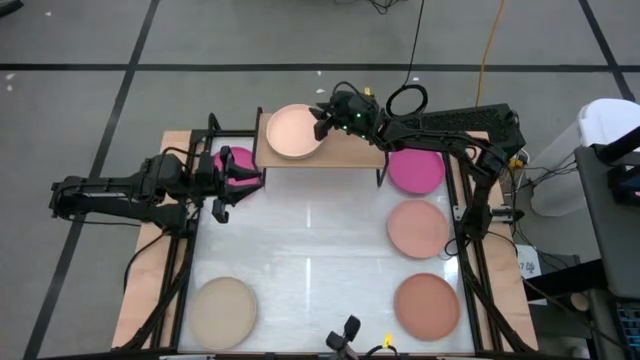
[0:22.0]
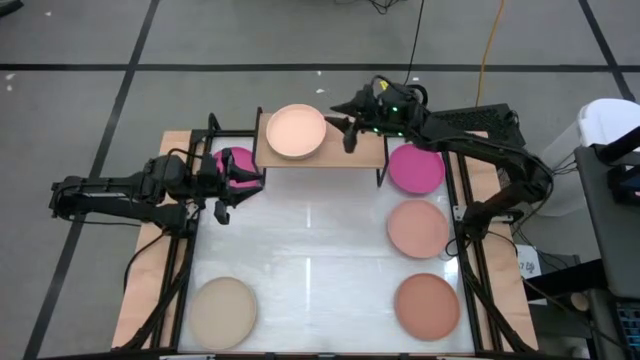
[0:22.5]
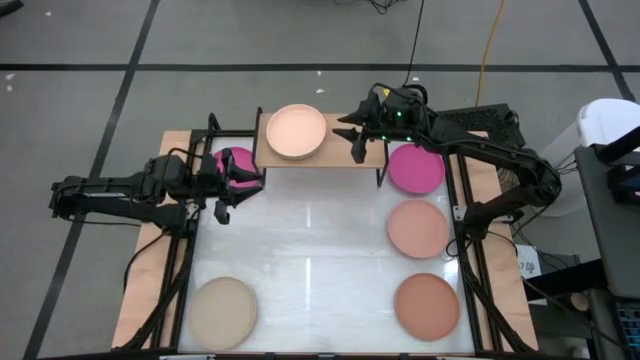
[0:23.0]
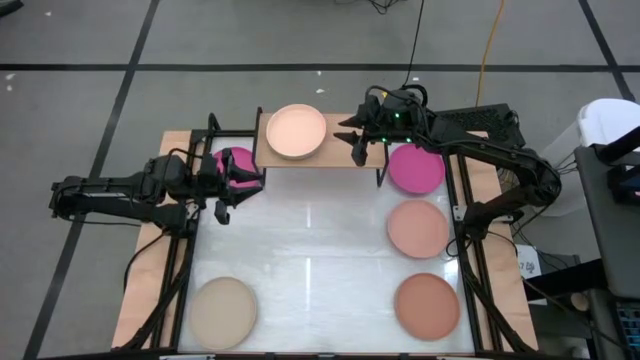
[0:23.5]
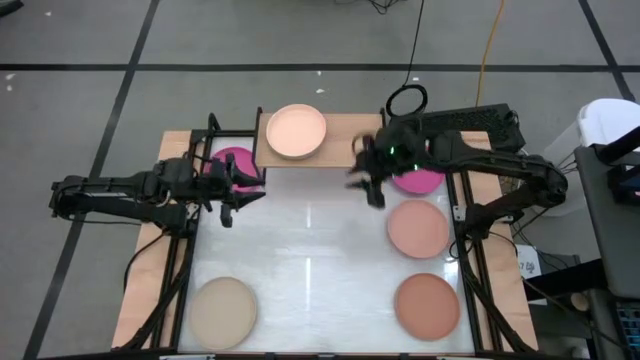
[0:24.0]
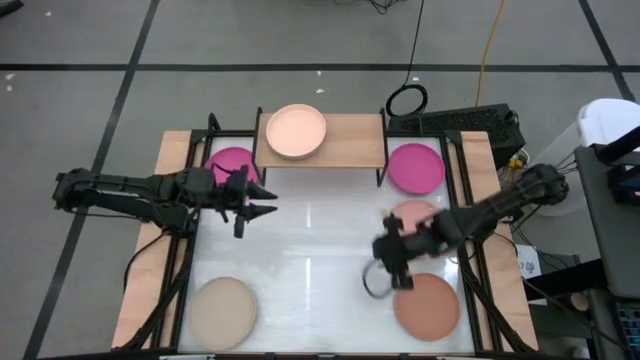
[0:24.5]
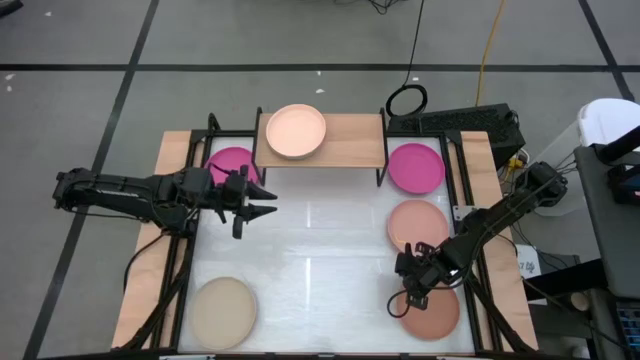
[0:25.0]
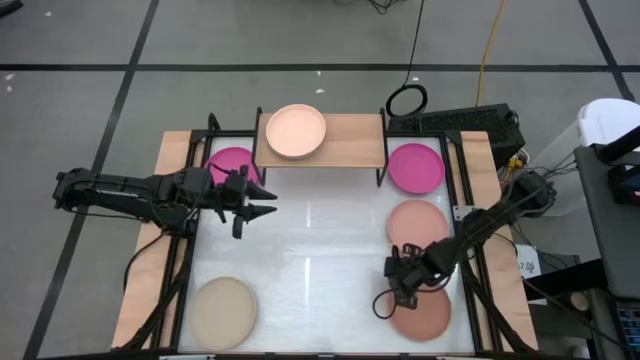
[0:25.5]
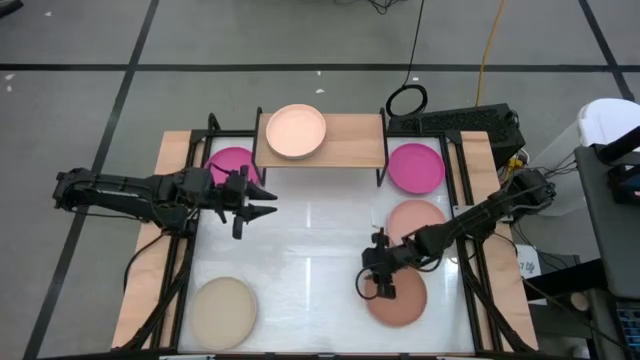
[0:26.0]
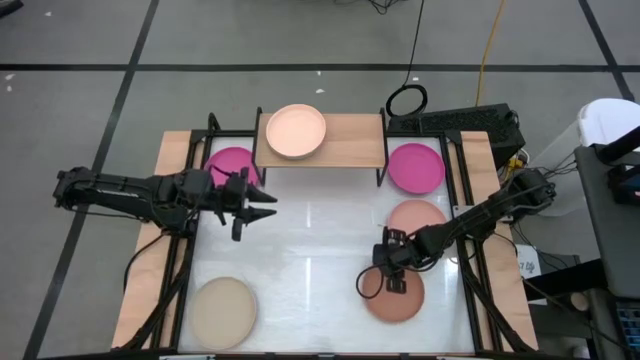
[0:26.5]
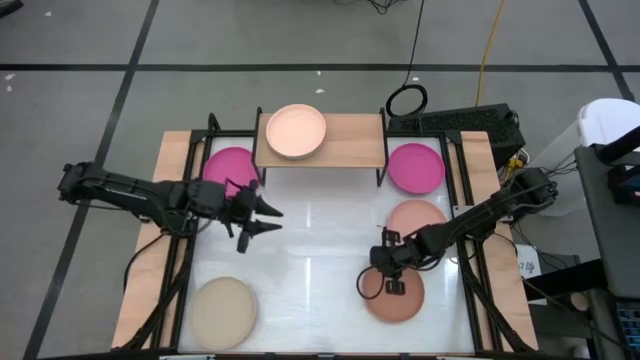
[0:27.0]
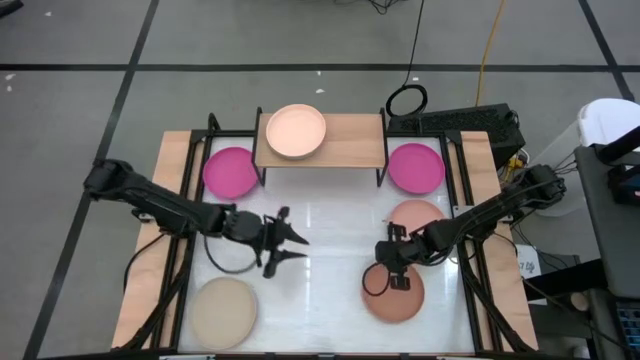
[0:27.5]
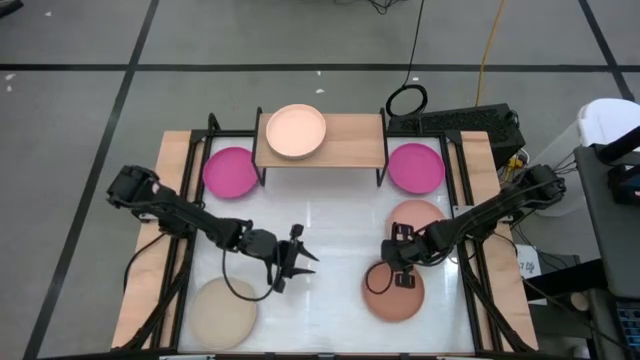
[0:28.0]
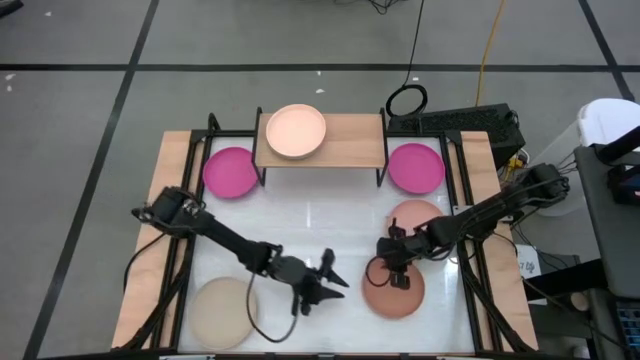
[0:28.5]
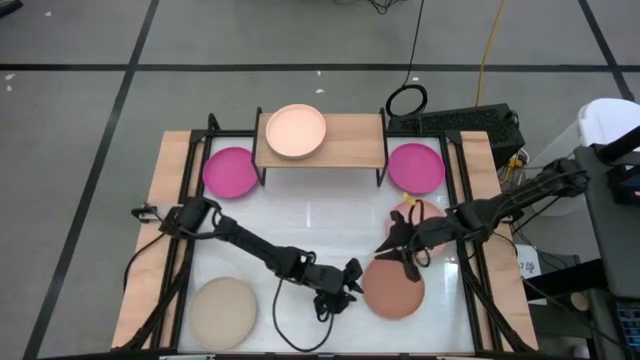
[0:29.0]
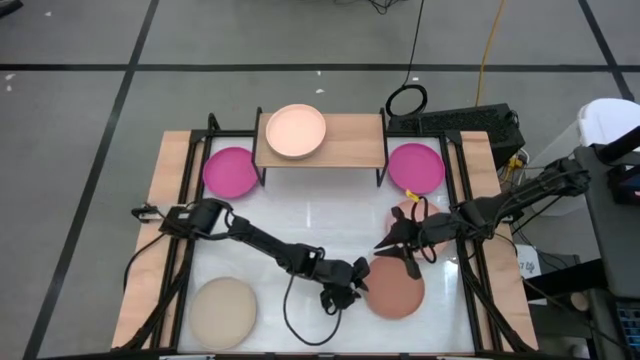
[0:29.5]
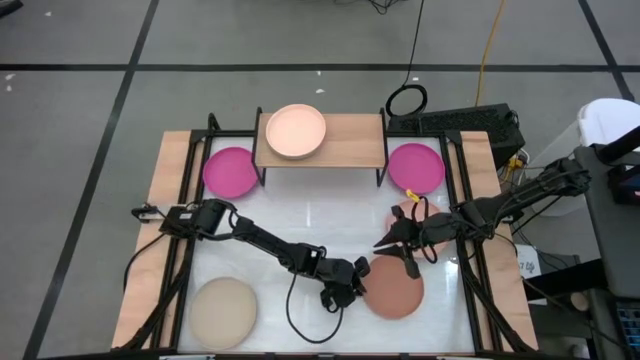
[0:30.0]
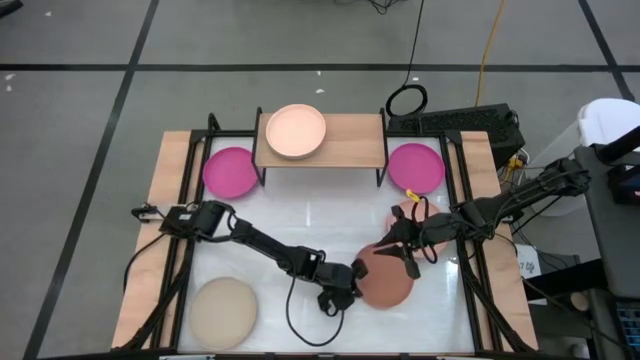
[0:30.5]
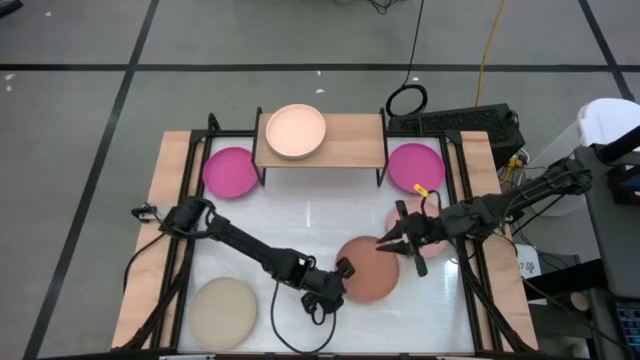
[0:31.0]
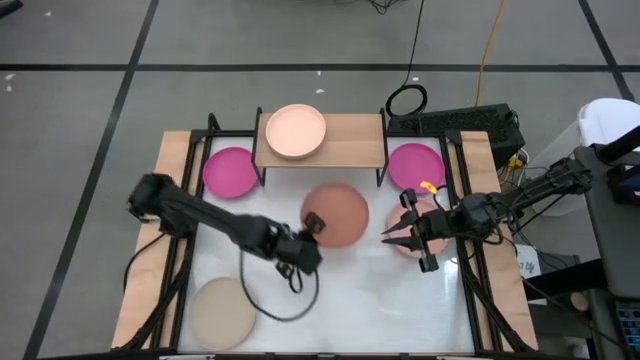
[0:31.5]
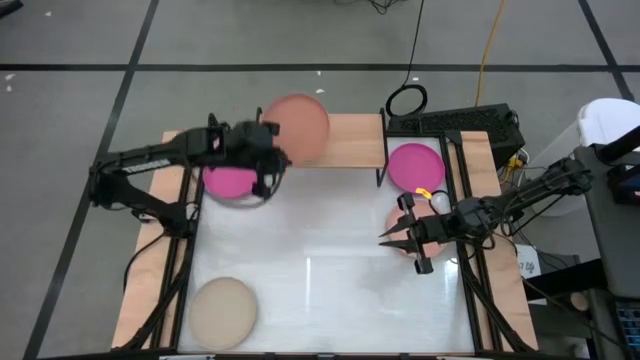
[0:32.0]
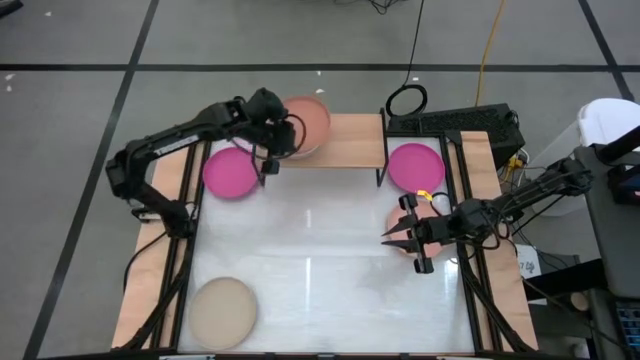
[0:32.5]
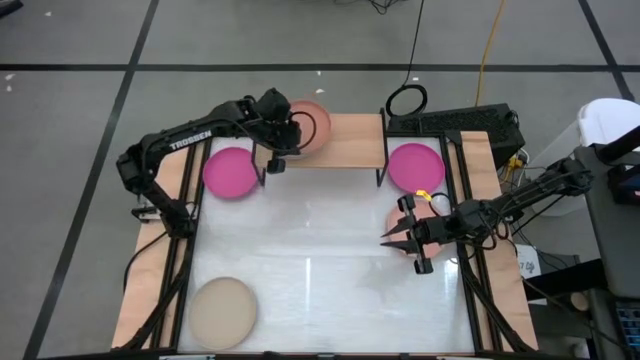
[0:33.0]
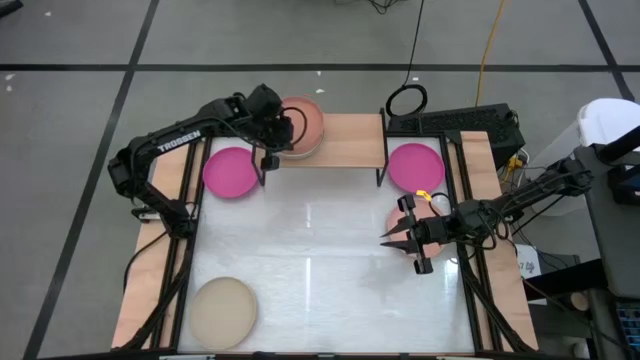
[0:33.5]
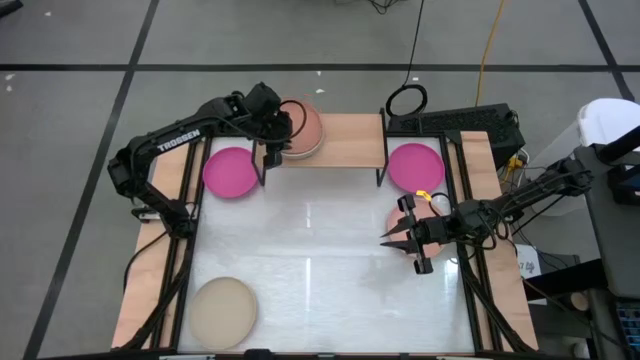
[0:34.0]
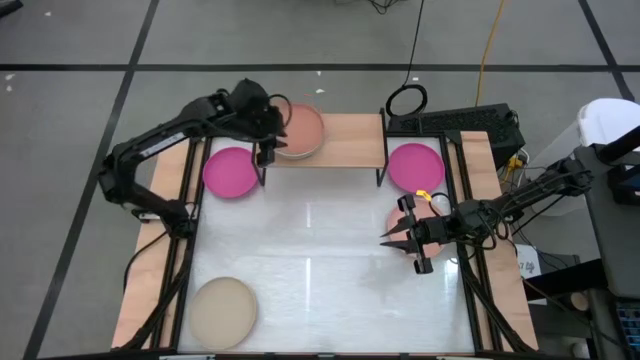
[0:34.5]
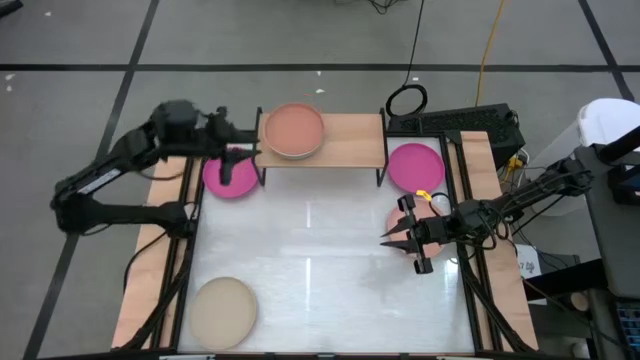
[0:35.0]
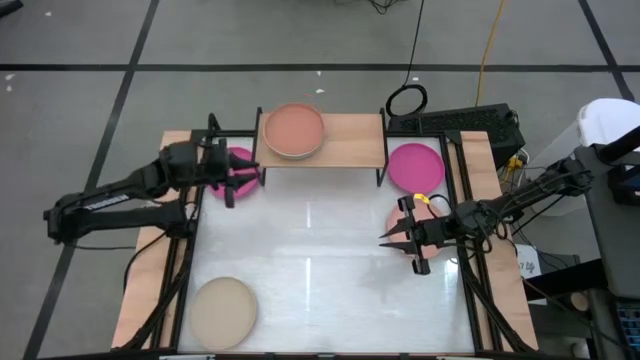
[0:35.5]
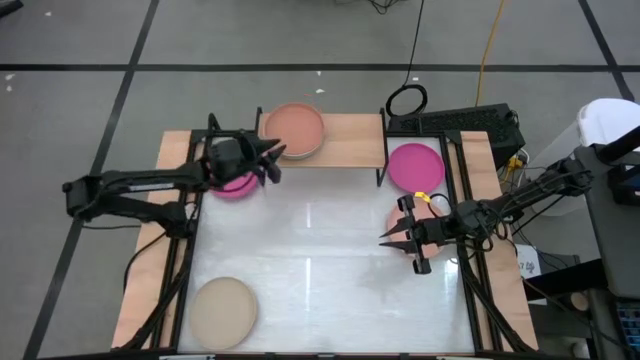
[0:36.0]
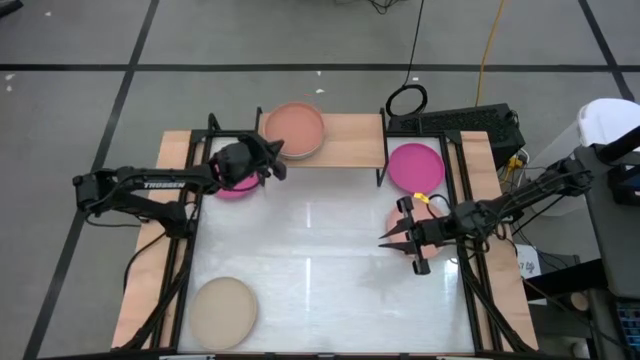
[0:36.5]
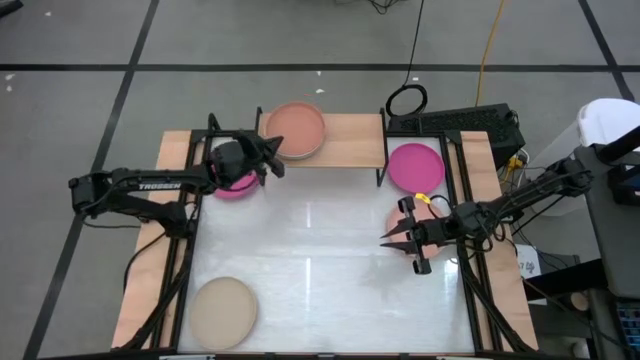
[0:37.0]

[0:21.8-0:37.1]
Task: Place and stack plates onto a shelf
Stack the brown plate on top of the light orange plate on the shelf

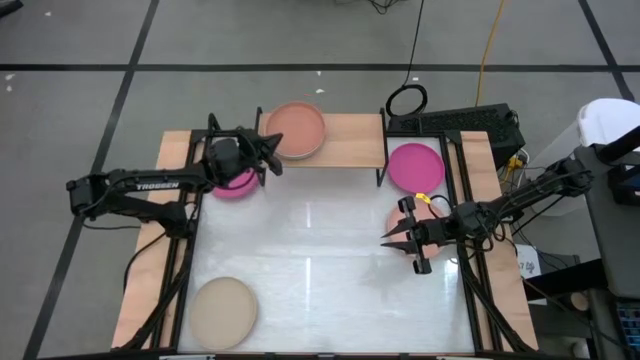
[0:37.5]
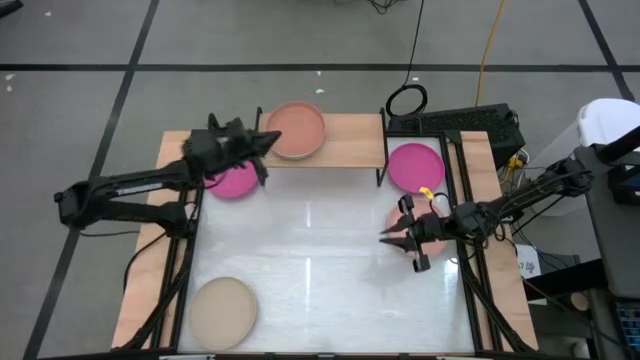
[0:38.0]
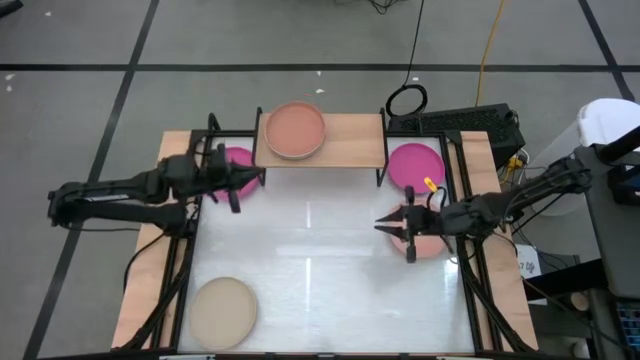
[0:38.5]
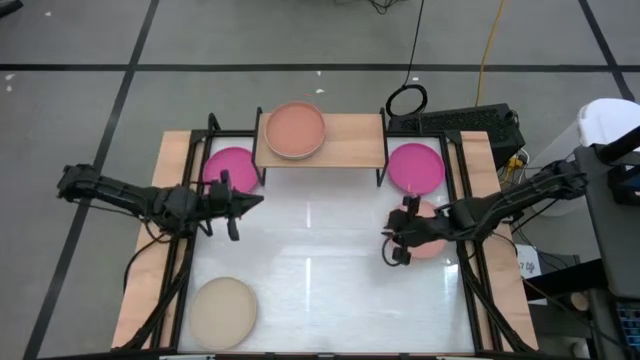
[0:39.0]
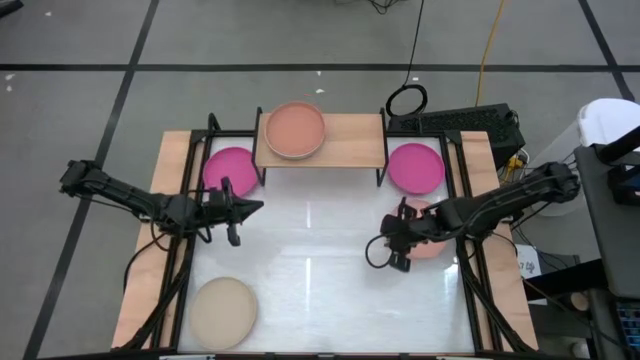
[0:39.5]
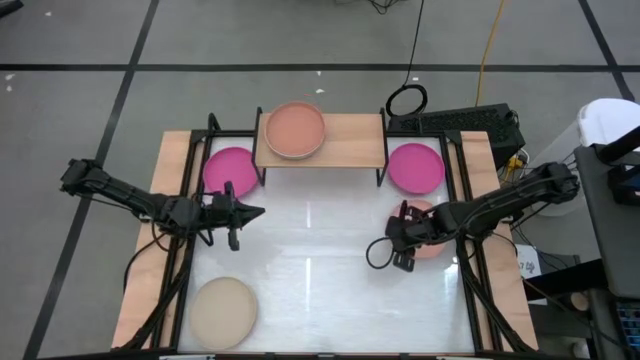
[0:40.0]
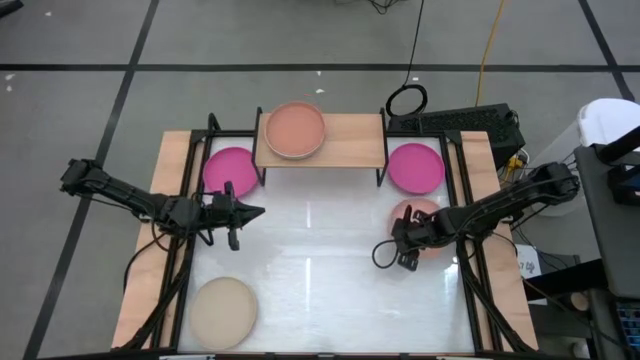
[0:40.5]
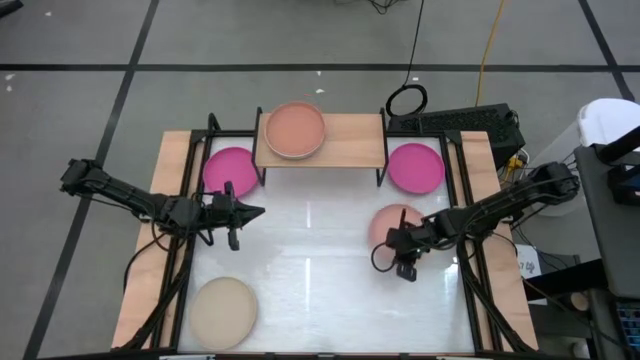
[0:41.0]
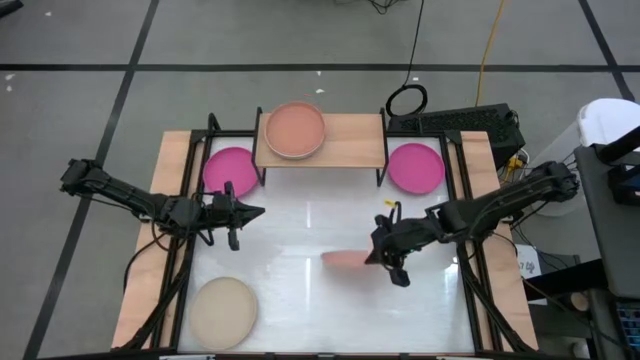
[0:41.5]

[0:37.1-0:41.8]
Put the light brown plate on the shelf

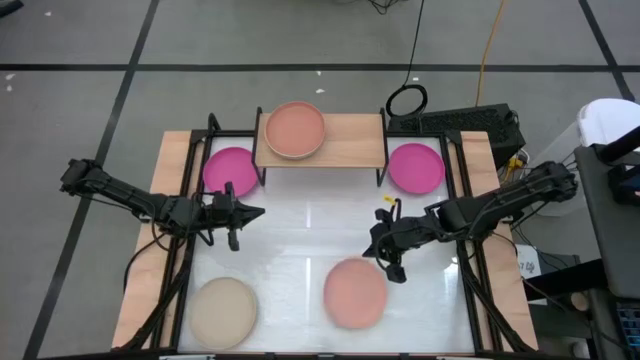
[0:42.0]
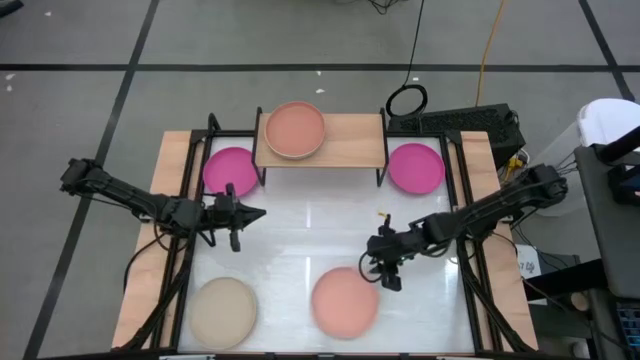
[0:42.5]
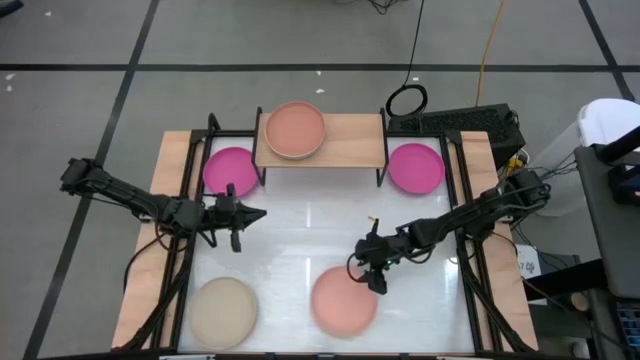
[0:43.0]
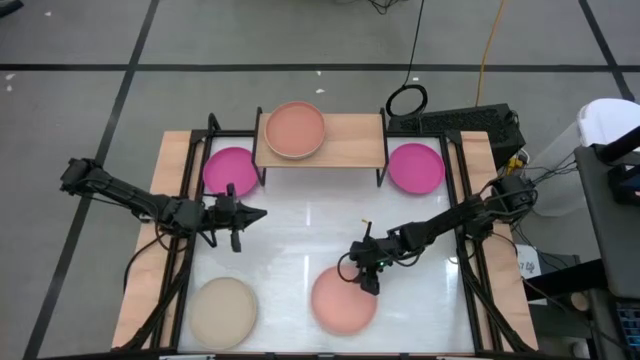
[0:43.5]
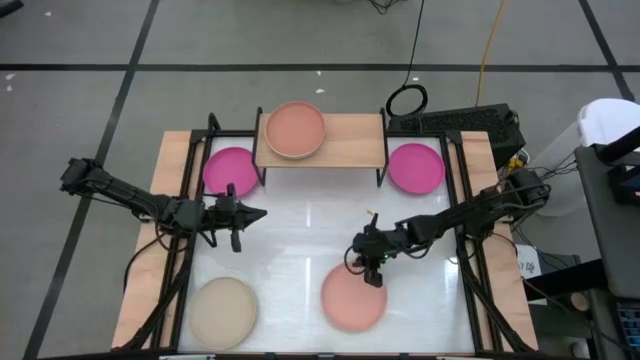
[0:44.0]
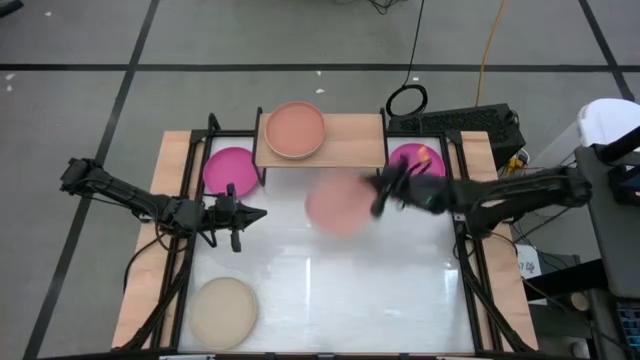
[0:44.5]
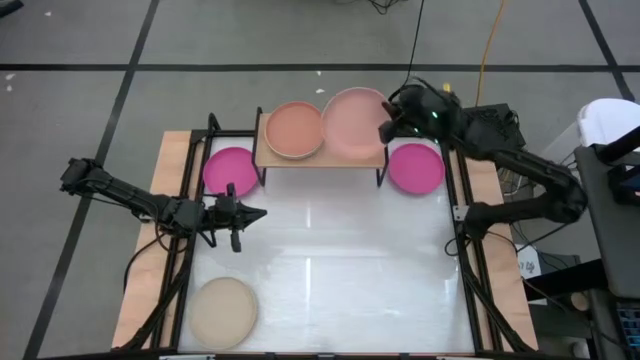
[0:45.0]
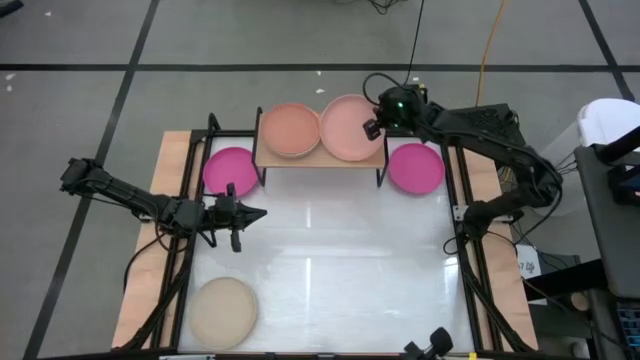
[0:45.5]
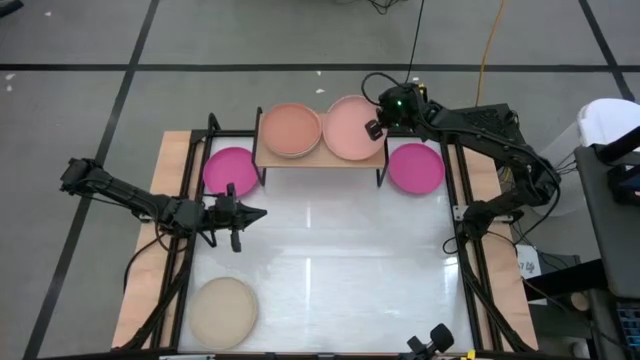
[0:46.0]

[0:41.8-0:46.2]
Put the light brown plate on the shelf
